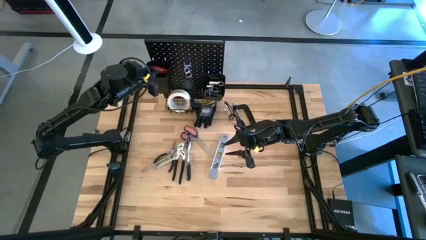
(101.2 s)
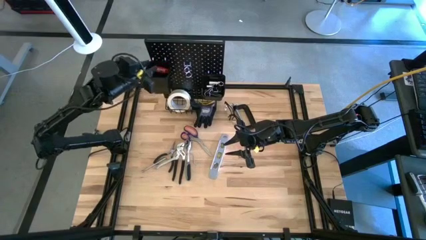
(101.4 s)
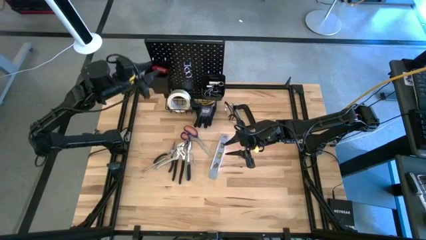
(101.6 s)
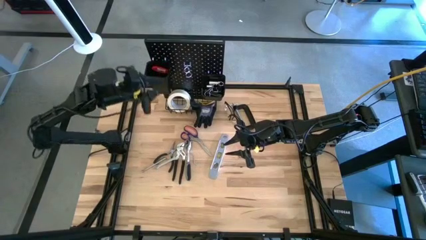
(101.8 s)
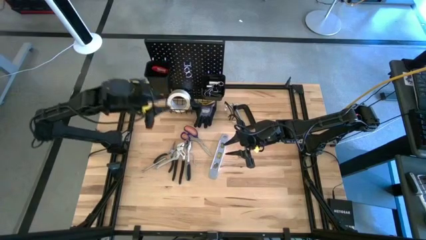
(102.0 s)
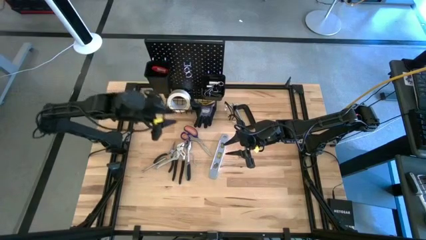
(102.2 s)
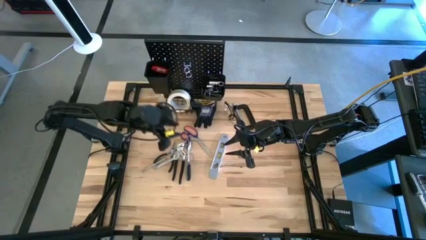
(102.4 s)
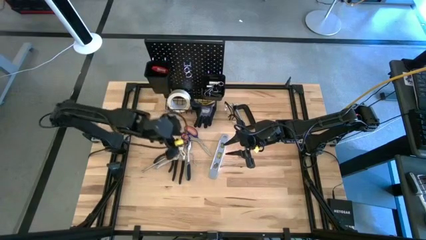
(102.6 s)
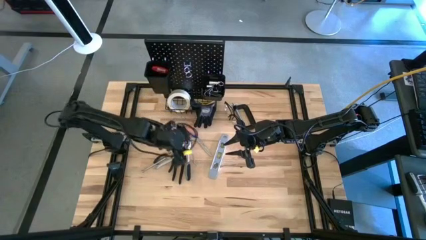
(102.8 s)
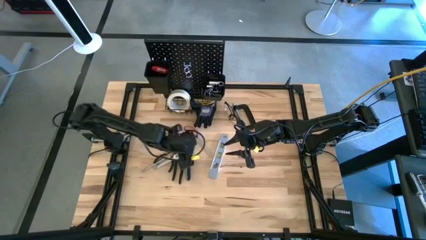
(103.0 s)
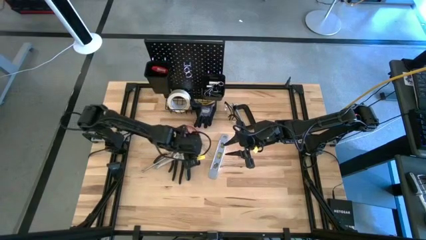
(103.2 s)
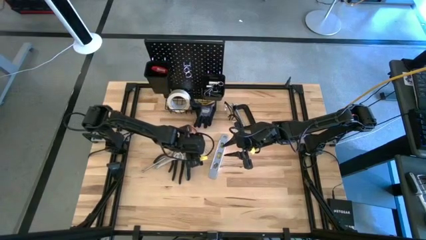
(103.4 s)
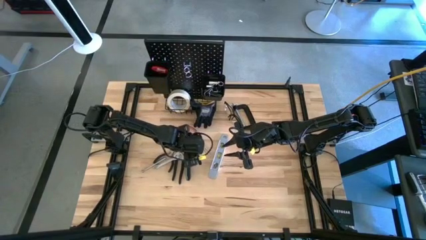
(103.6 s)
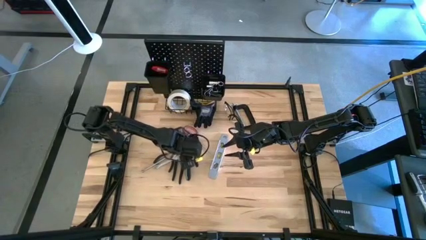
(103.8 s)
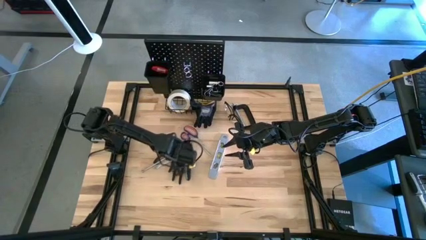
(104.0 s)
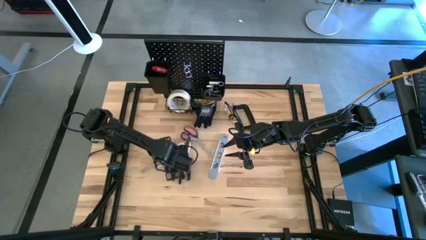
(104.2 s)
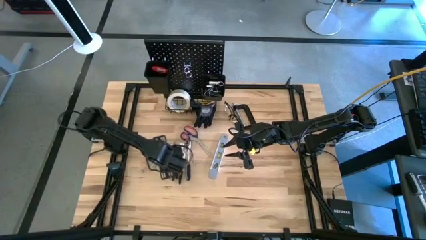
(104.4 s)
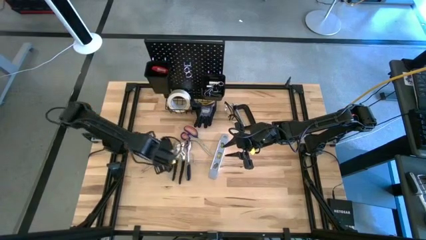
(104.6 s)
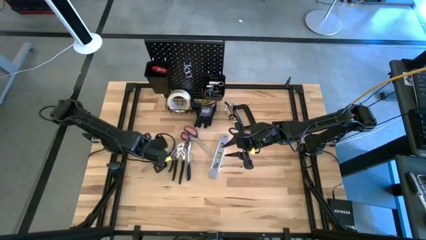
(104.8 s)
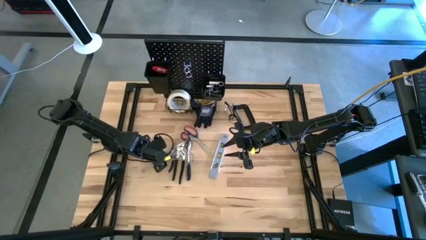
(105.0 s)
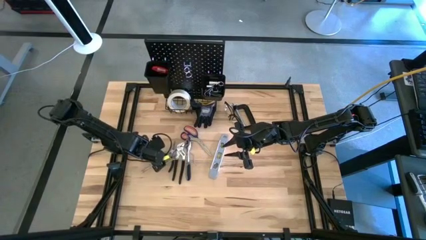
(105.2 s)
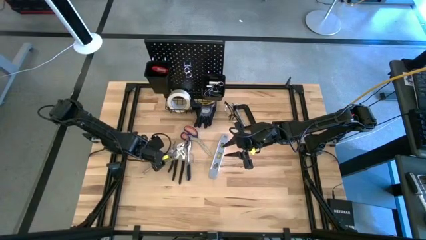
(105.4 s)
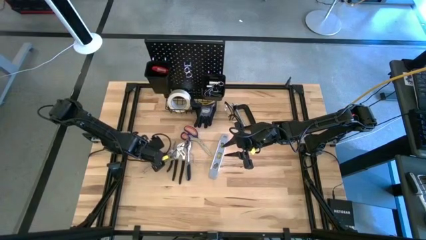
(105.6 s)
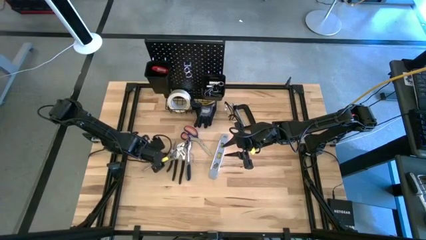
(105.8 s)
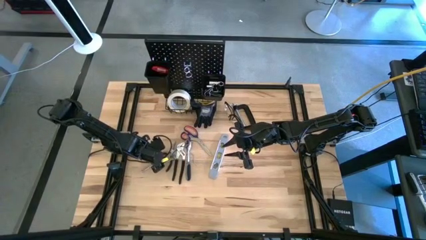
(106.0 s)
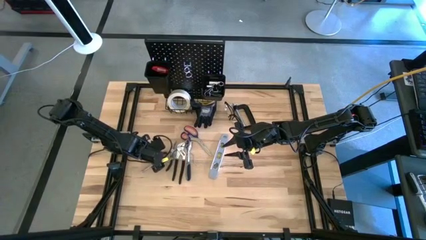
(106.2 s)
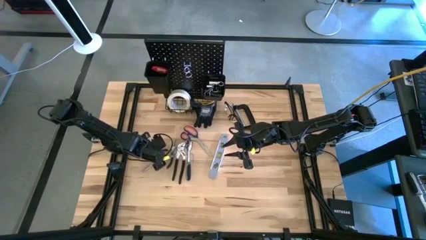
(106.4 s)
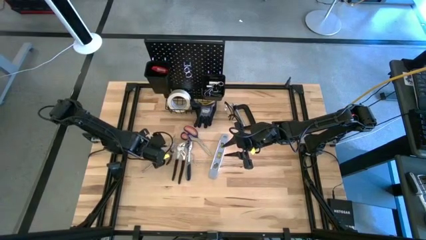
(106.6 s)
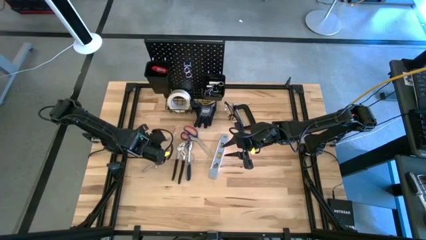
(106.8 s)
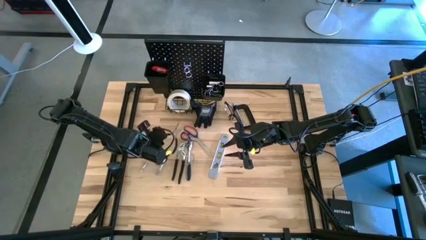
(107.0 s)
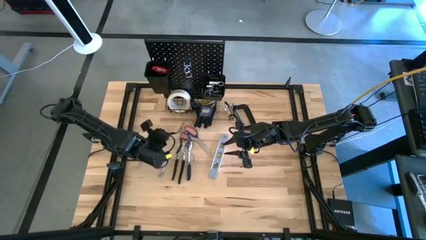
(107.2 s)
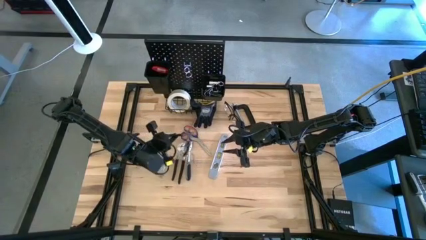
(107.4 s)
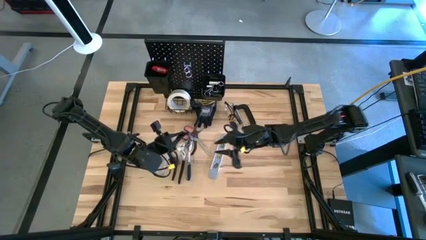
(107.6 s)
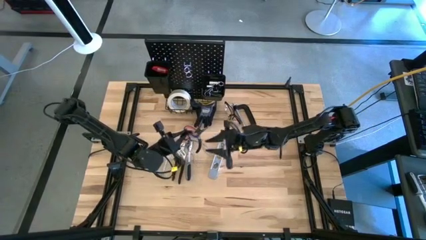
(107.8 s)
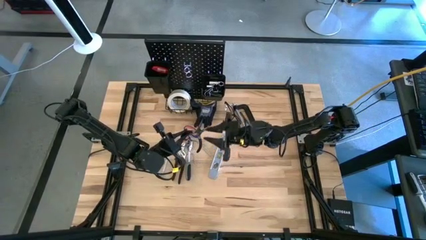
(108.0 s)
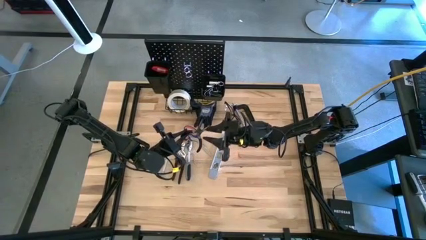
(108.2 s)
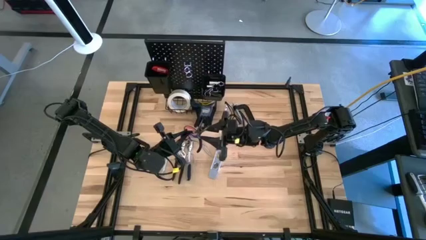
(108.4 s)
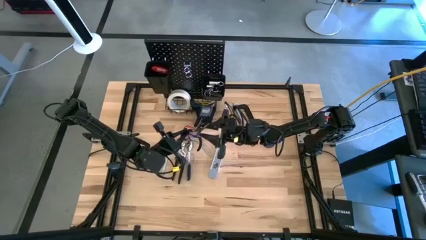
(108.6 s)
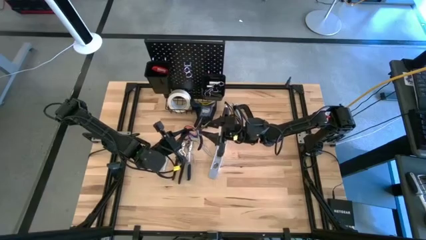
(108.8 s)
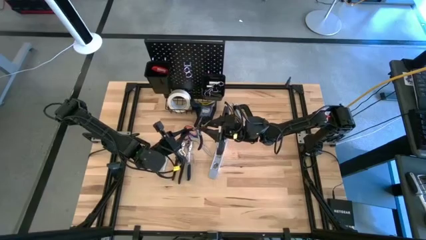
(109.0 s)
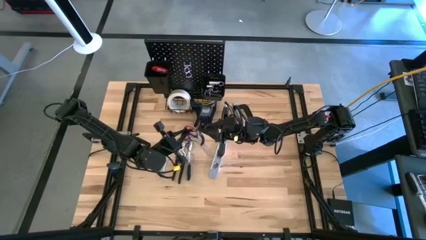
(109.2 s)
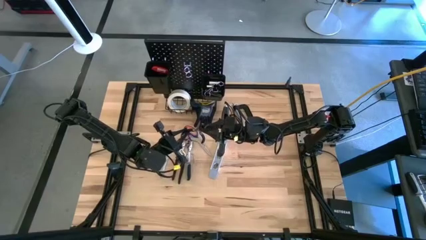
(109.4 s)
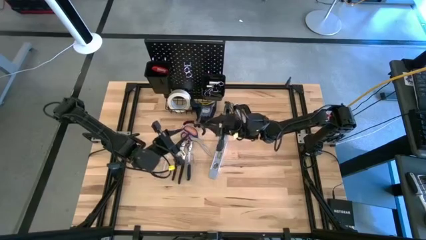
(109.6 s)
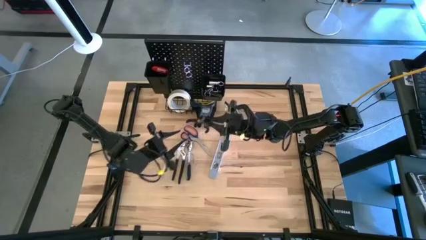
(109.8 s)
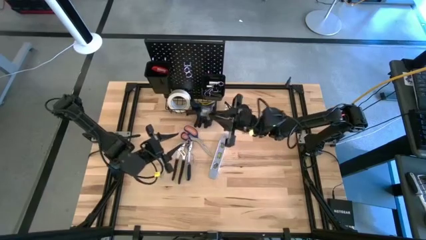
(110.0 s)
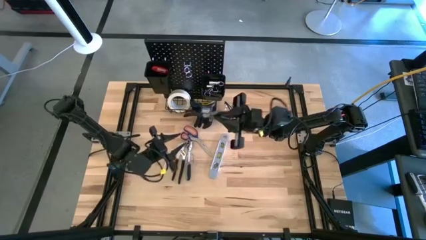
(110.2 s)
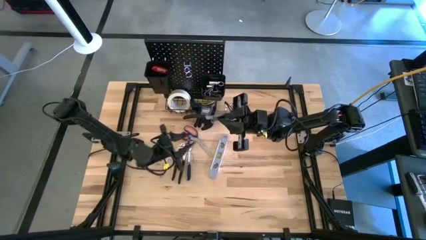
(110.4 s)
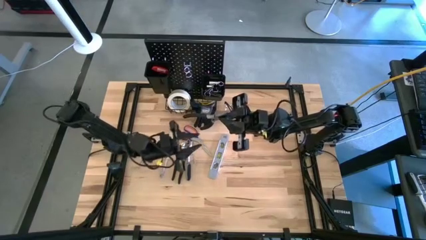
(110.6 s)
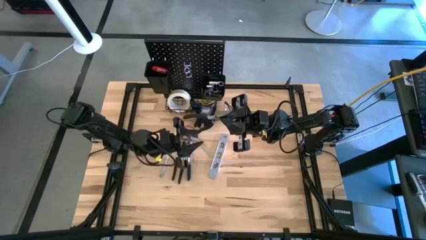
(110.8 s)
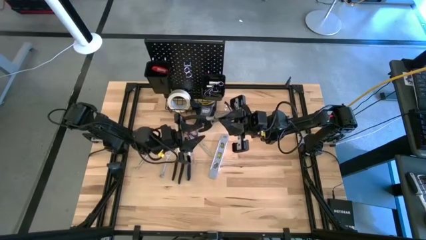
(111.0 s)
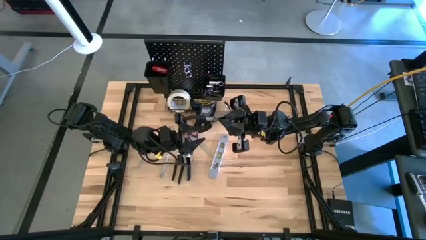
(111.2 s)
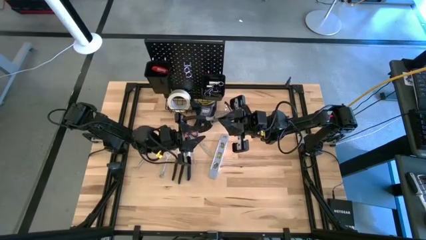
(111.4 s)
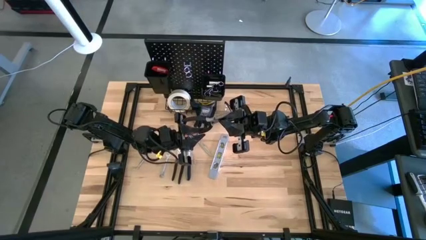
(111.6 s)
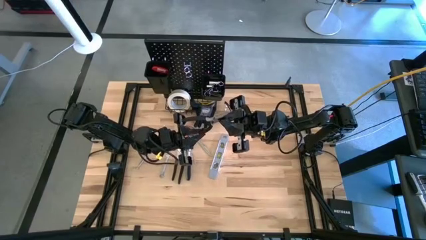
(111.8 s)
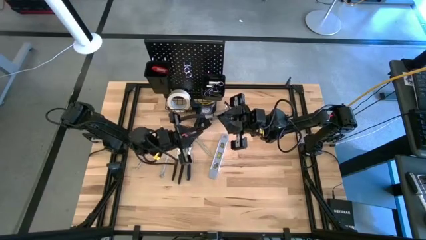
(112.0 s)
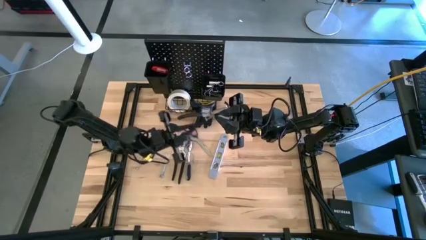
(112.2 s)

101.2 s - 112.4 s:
Task: Hang tools onto peg board
Put the long nose pliers into the left black bin on the pegboard

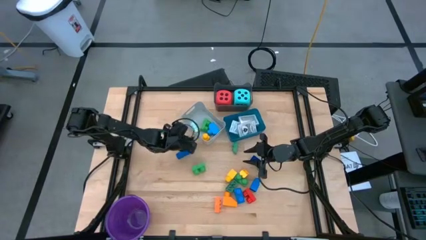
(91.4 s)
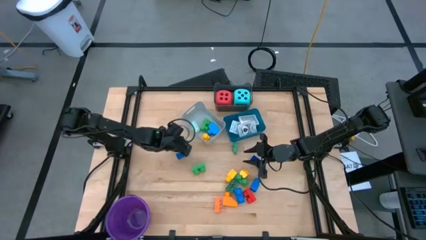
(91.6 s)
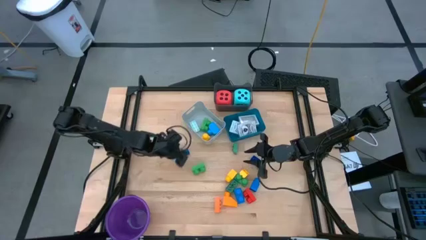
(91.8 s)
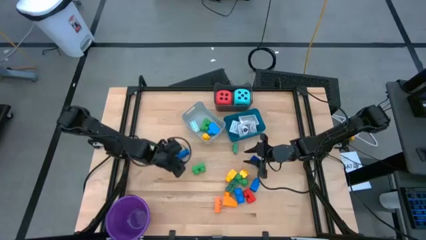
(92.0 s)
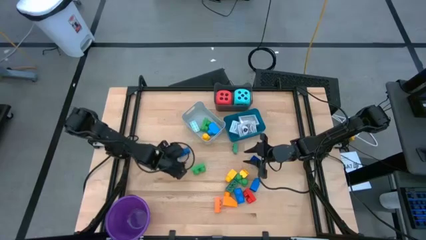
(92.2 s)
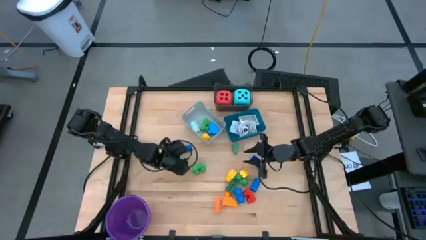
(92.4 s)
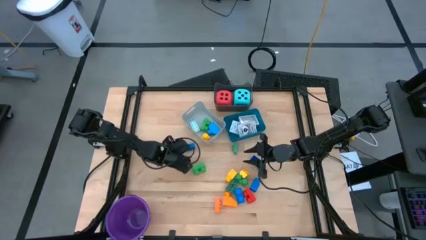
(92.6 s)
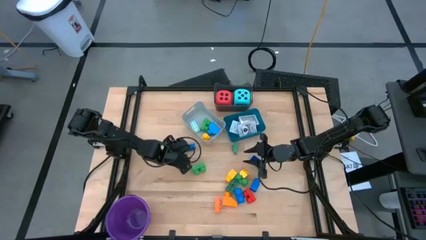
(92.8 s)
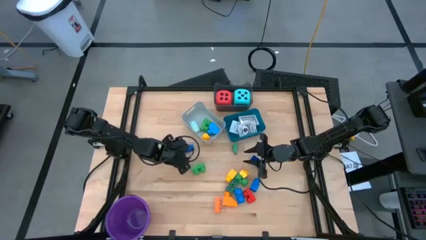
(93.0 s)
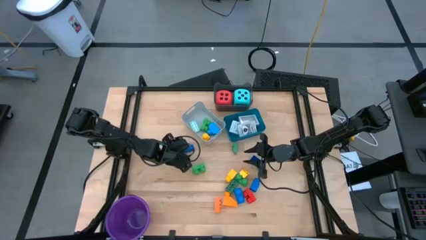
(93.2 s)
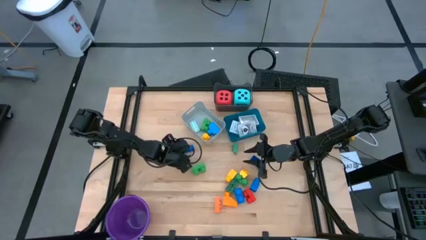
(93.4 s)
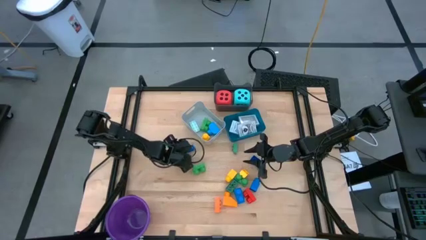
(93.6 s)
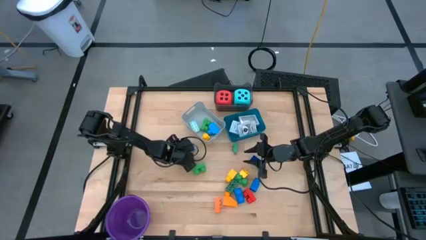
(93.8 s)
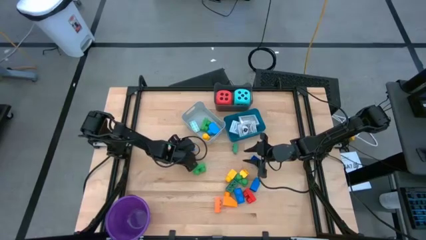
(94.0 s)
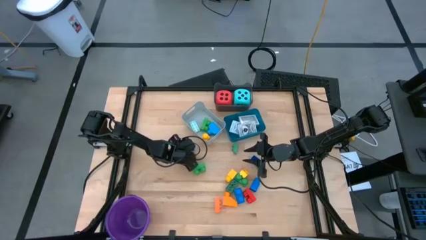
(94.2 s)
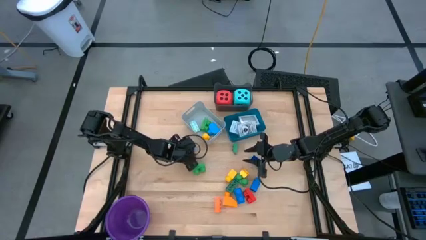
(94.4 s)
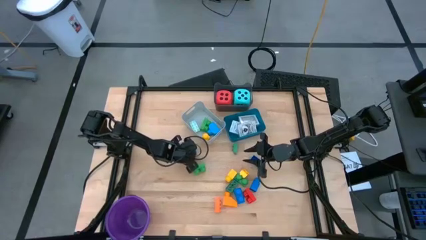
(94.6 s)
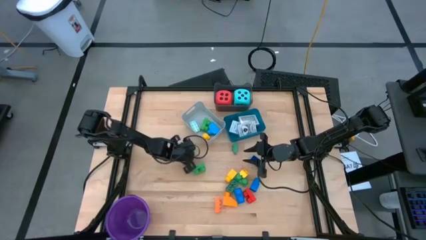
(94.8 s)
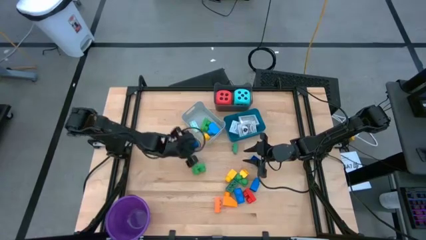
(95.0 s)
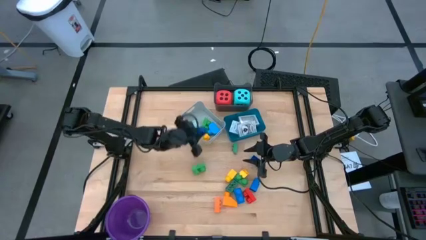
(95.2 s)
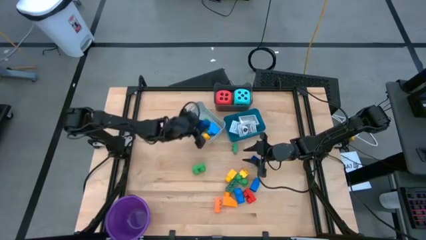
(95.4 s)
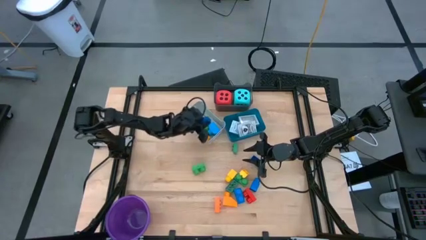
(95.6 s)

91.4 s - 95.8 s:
Task: Pick & Place Toys
Put the blue game piece into the gray bin

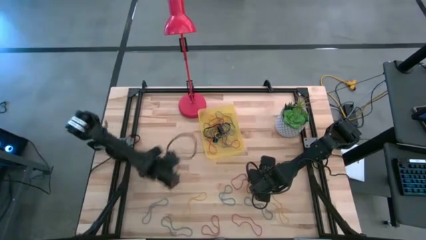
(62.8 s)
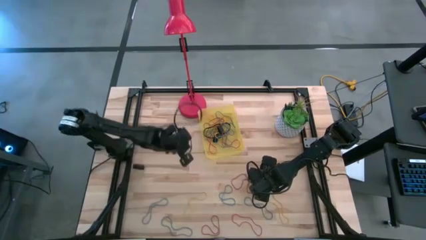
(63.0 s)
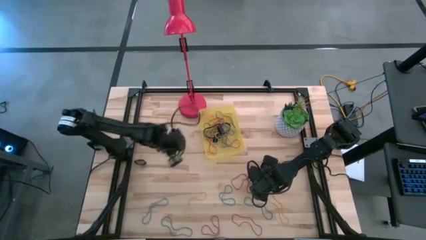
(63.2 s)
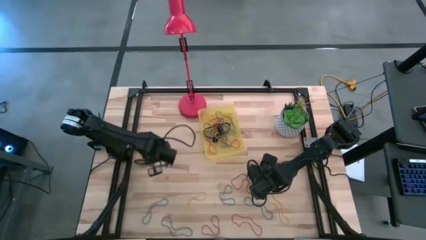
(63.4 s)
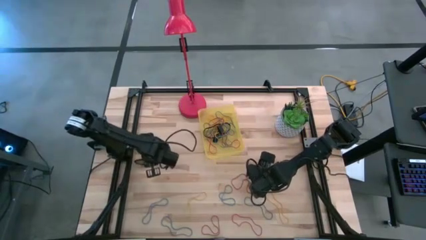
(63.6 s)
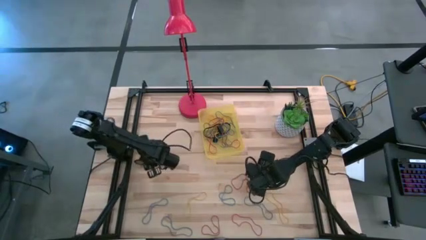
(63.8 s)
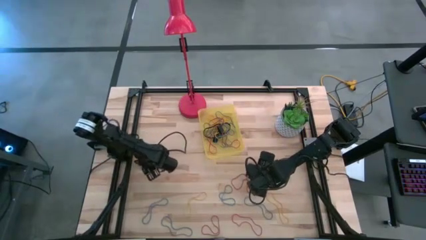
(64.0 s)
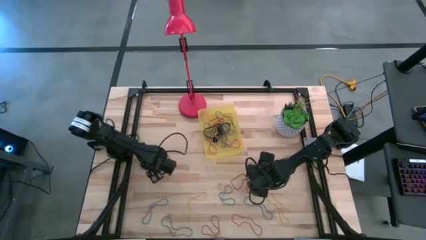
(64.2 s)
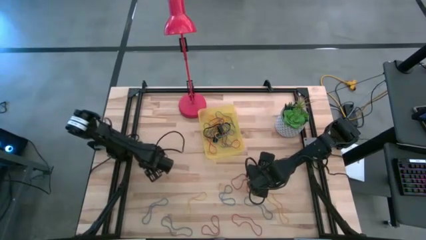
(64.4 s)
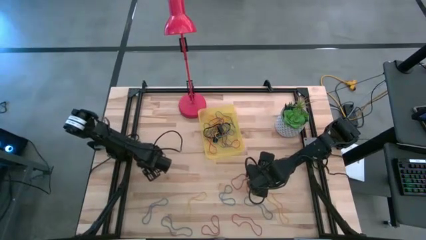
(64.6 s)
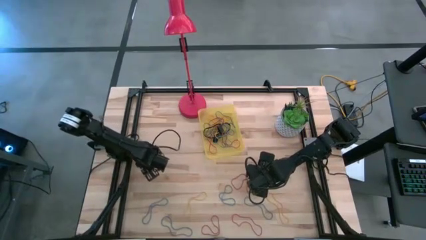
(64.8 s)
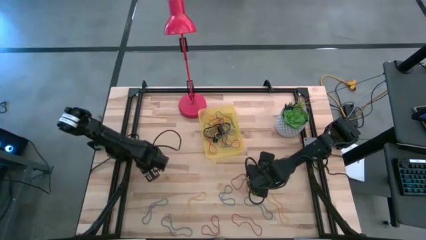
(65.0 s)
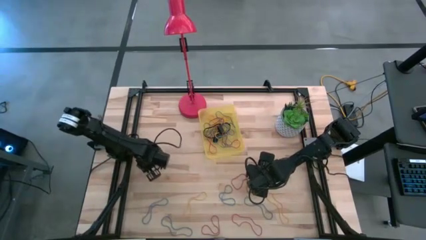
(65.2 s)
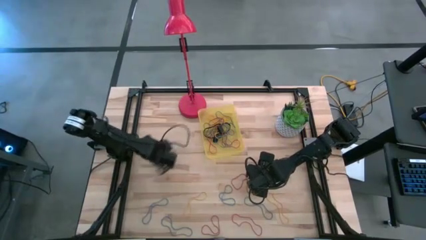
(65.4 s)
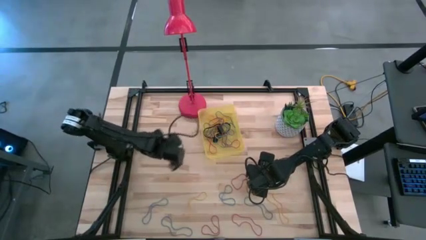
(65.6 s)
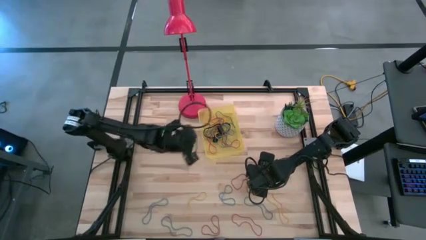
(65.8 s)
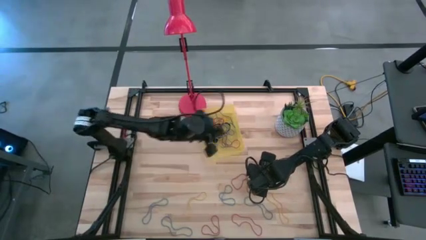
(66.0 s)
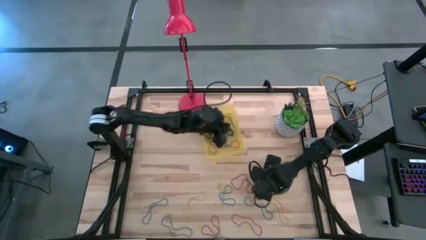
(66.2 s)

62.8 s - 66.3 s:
Task: Pick and place rubber bands into bin
Put the black rubber band into the yellow bin
